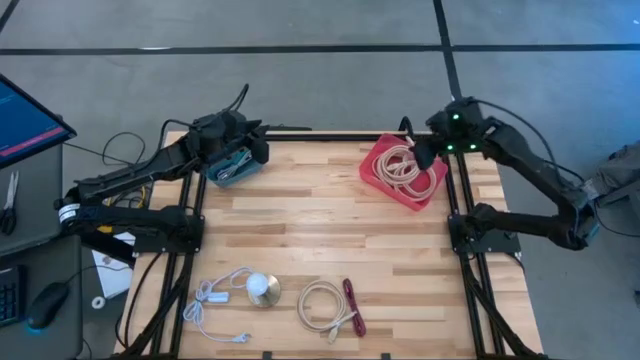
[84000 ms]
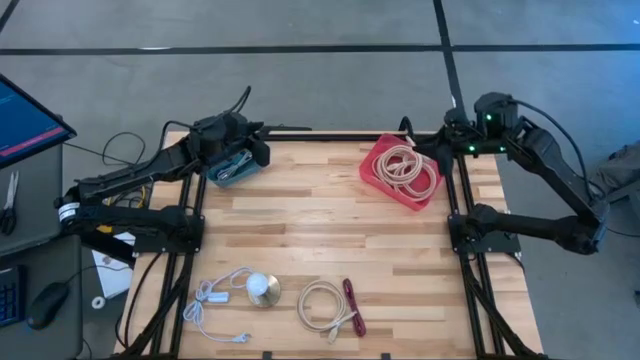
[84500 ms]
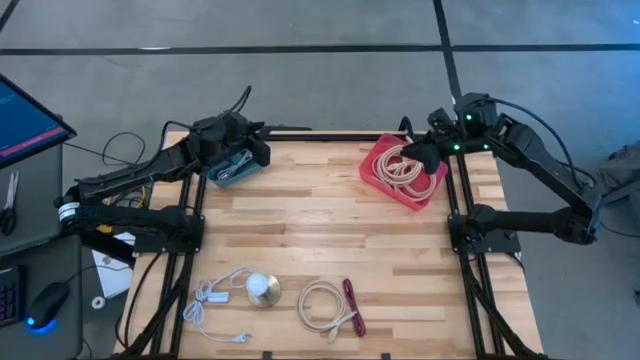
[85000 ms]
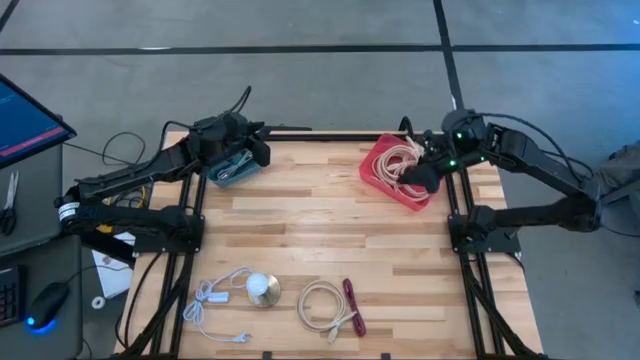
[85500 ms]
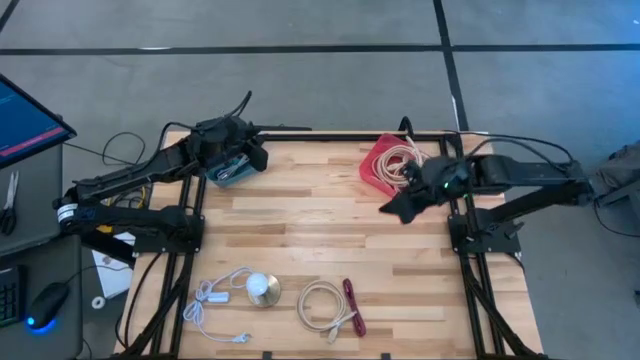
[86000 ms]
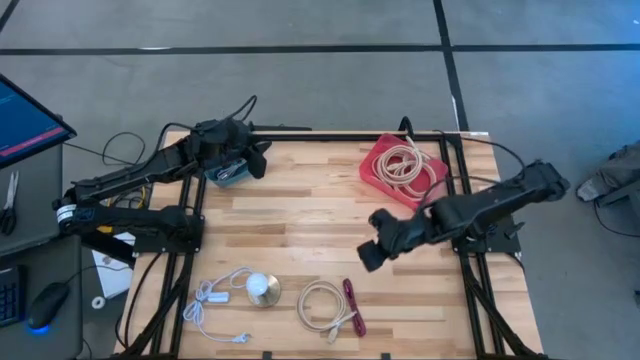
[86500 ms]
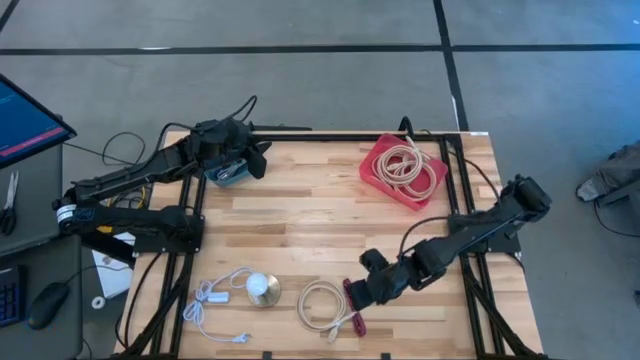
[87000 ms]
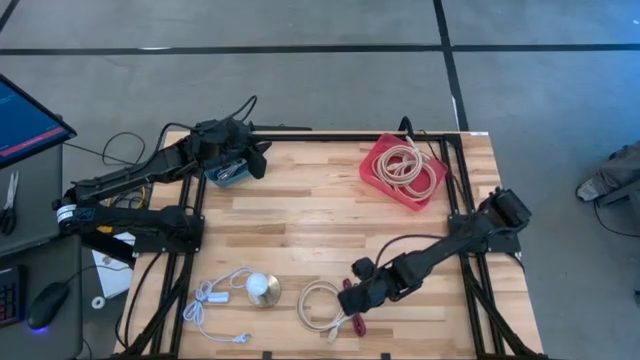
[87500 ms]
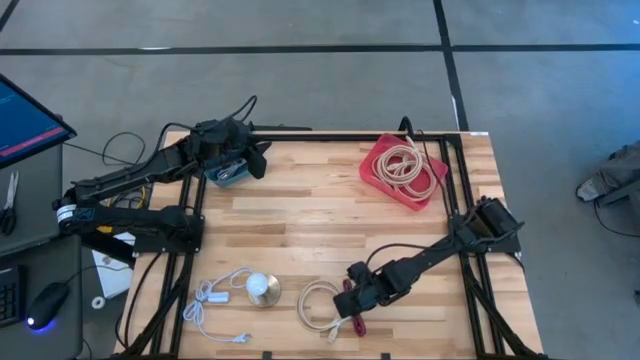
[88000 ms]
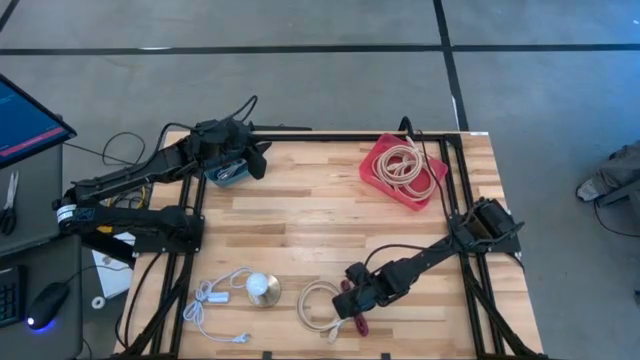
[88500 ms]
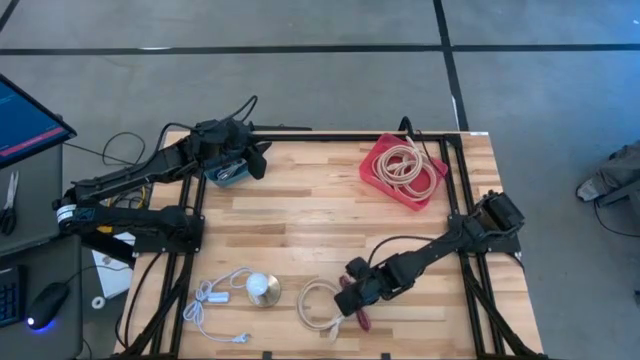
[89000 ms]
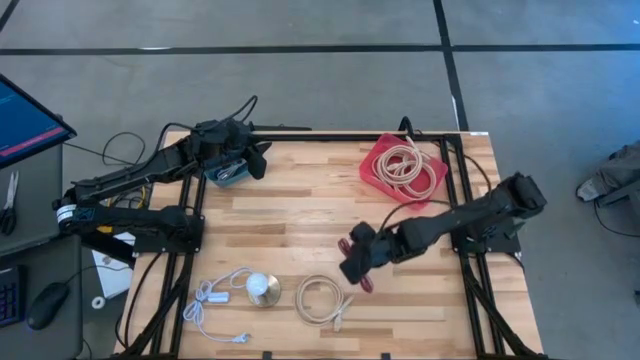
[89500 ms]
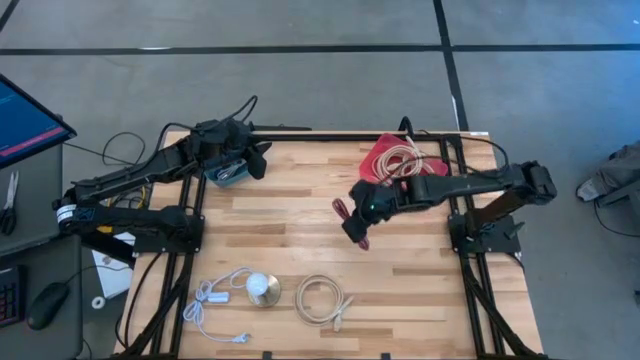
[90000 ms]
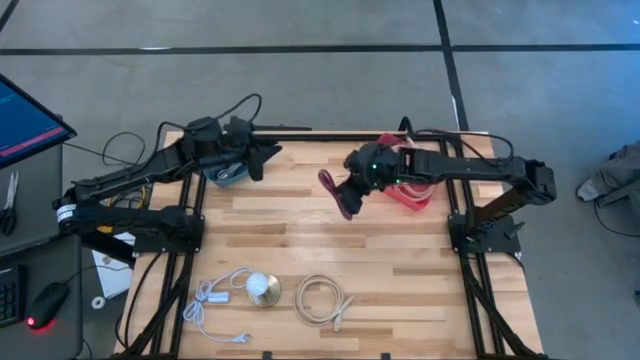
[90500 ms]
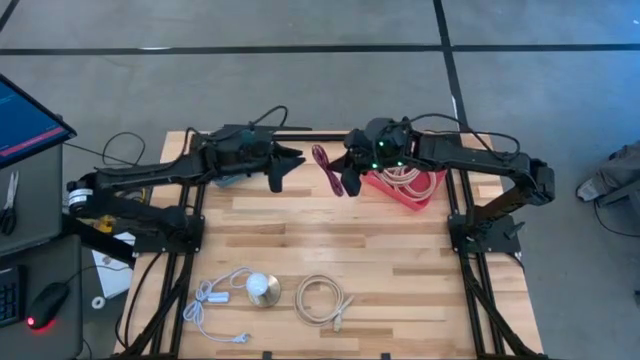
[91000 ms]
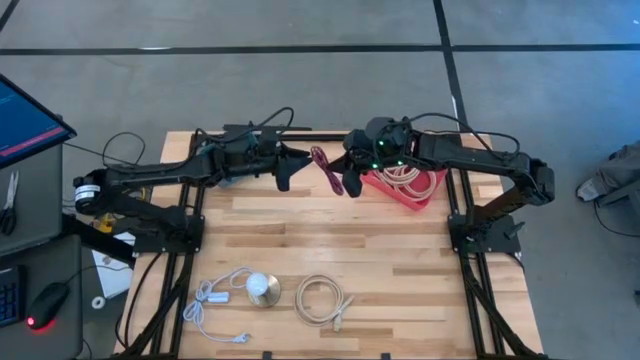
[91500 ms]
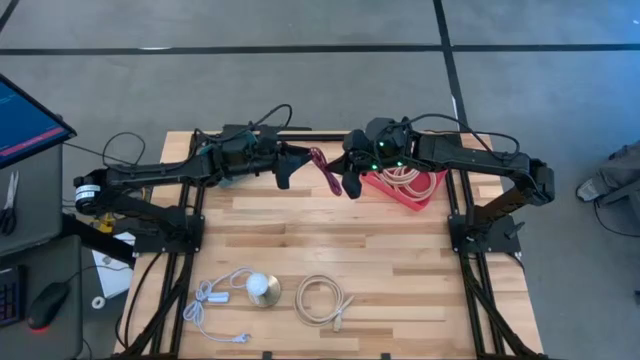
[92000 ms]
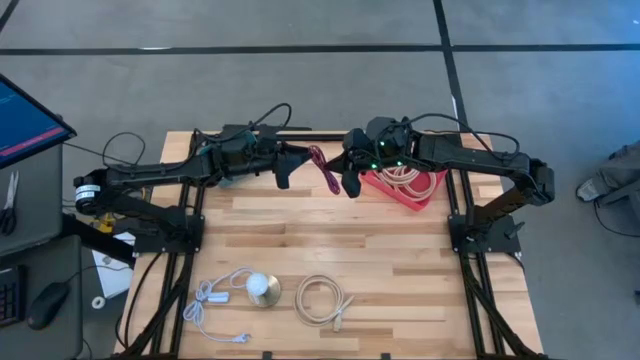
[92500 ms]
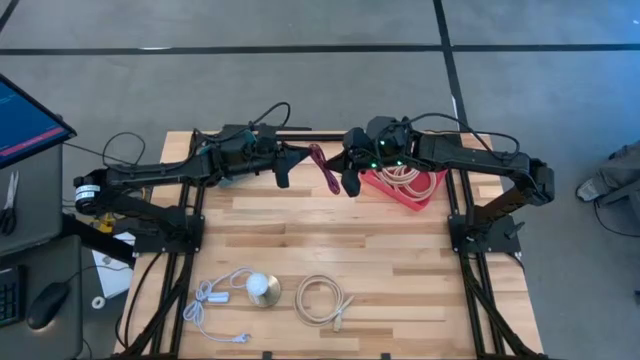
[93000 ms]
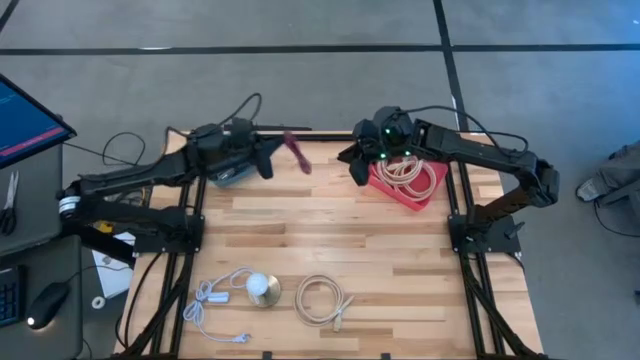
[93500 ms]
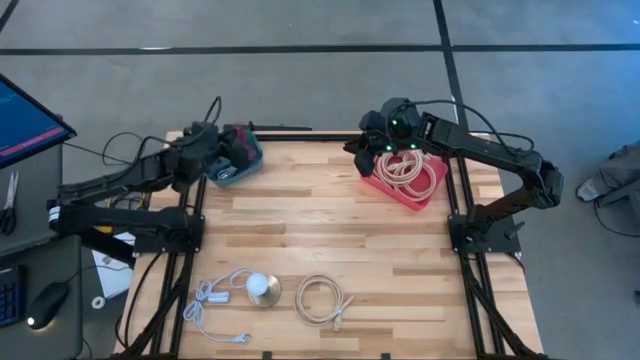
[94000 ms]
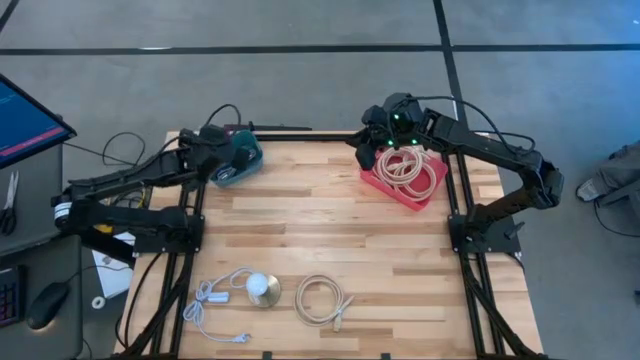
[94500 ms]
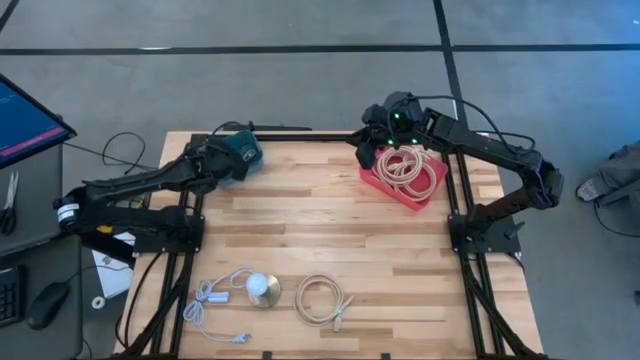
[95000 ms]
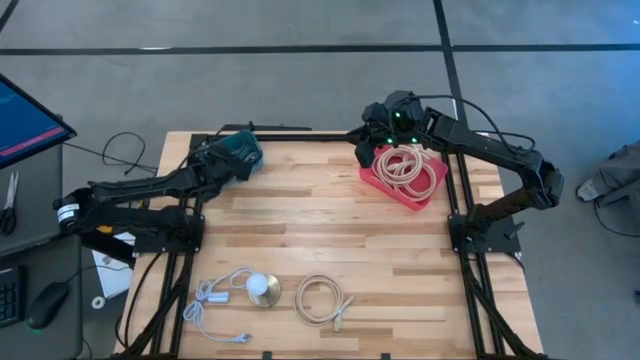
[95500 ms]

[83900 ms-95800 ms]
Task: Pick & Place USB Port
Put the pink black charger cable into blue bin

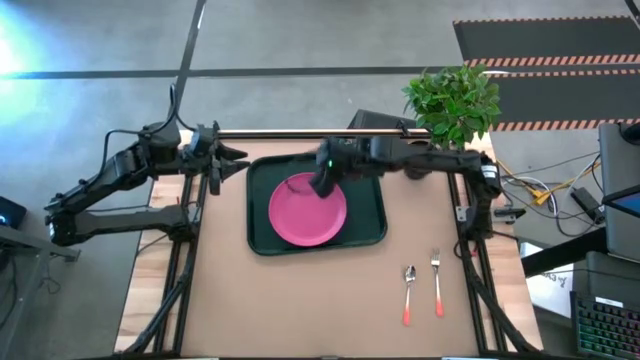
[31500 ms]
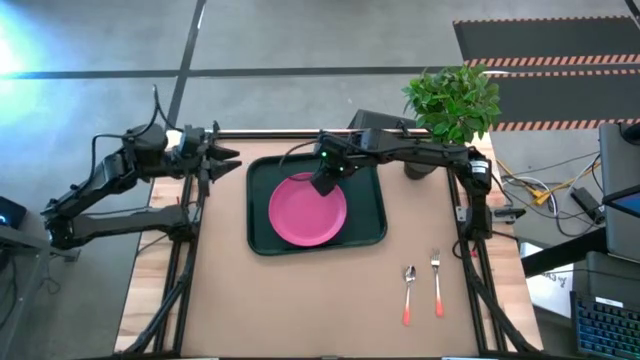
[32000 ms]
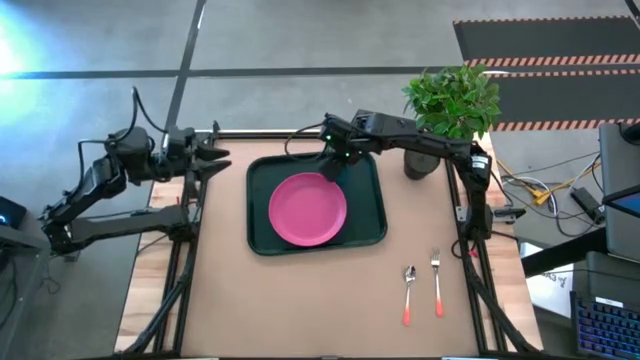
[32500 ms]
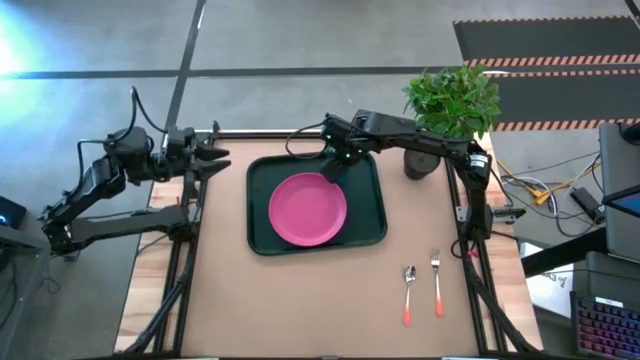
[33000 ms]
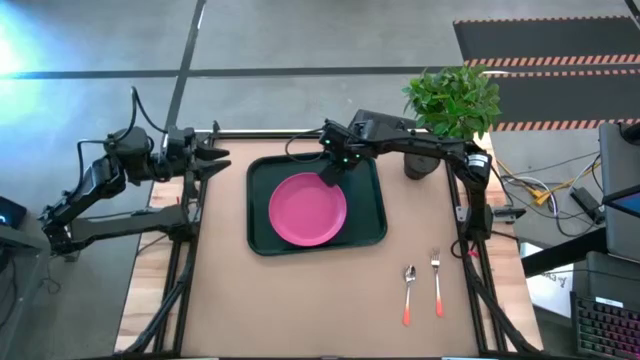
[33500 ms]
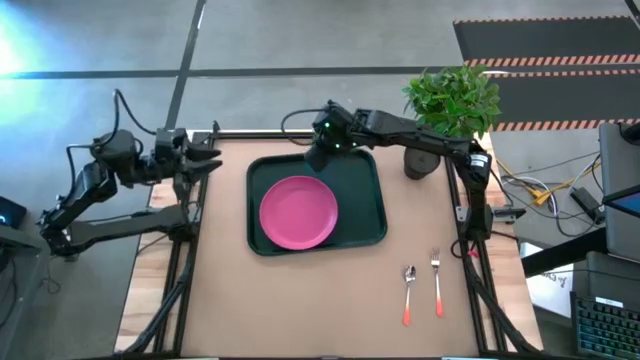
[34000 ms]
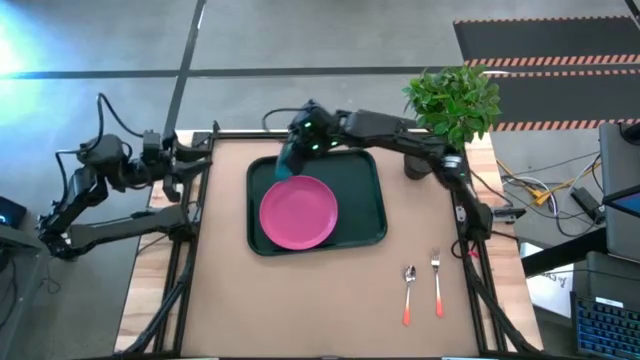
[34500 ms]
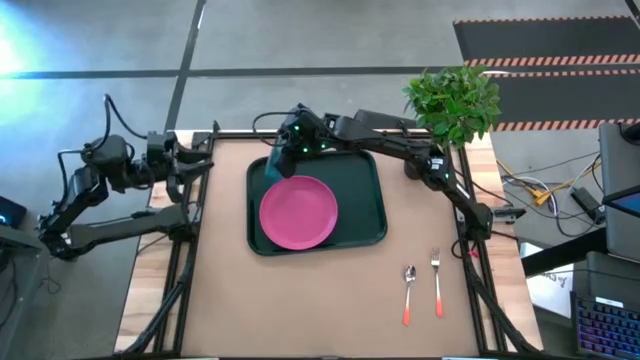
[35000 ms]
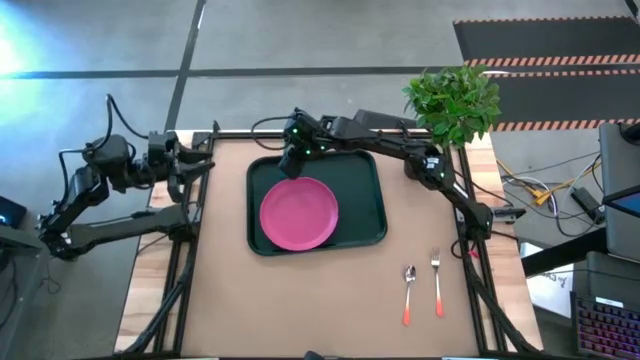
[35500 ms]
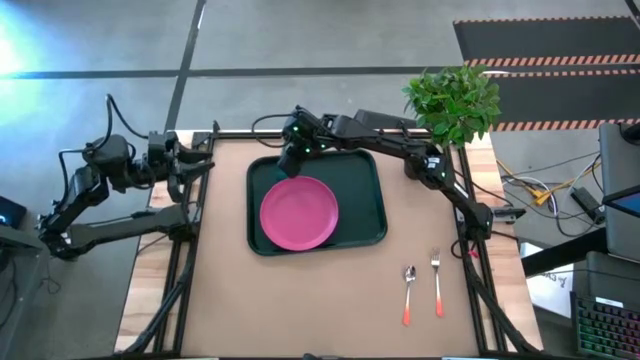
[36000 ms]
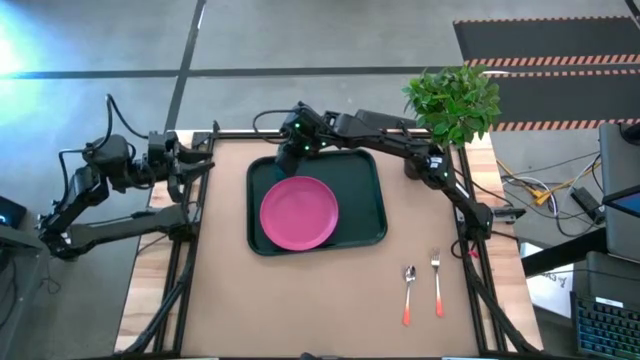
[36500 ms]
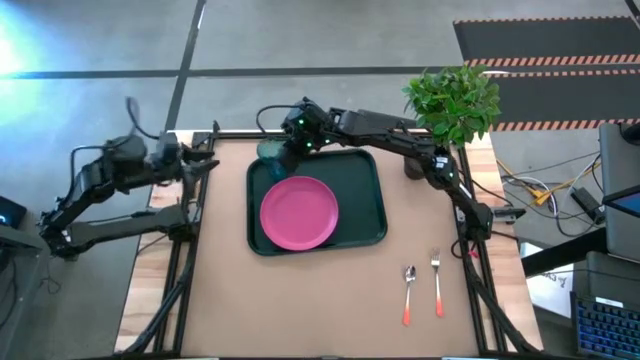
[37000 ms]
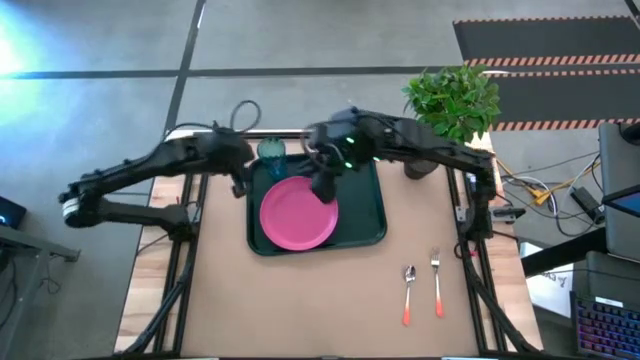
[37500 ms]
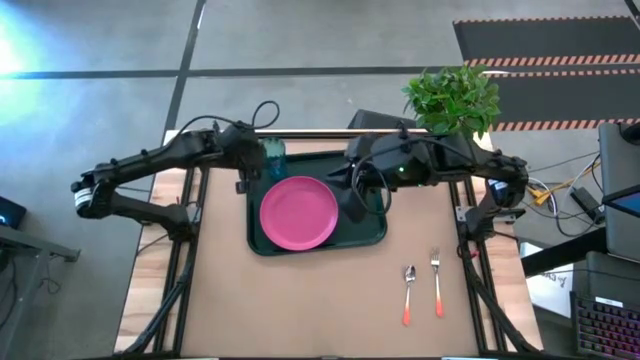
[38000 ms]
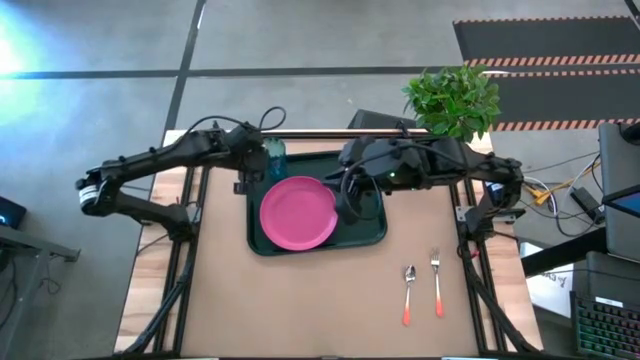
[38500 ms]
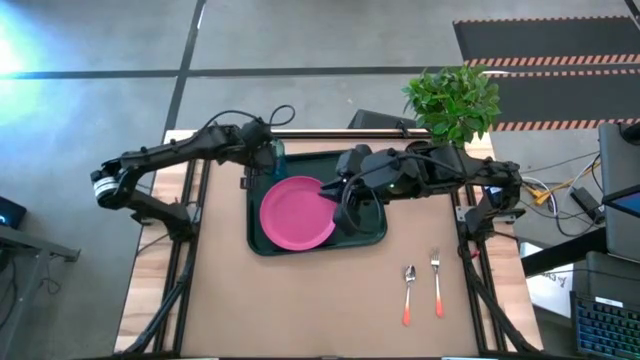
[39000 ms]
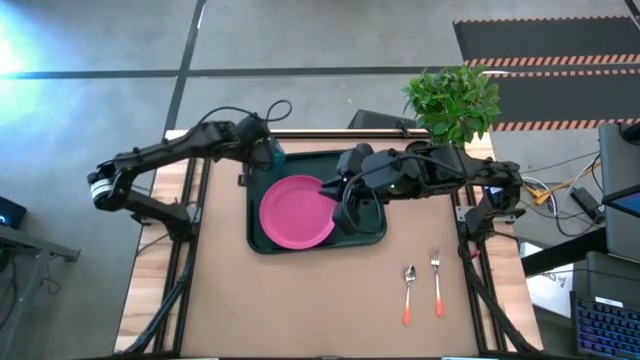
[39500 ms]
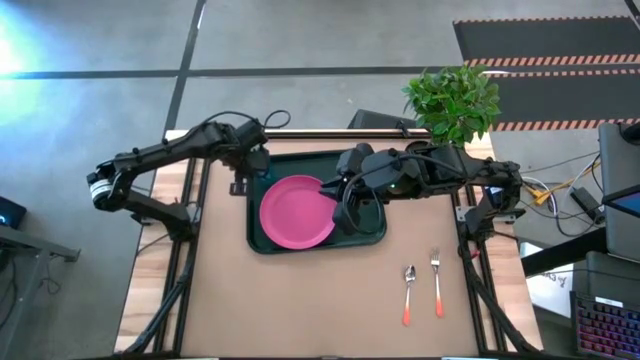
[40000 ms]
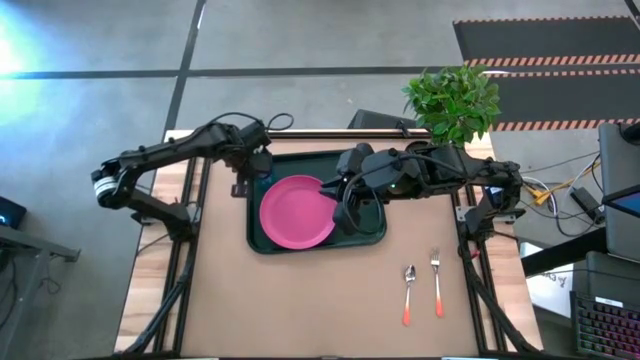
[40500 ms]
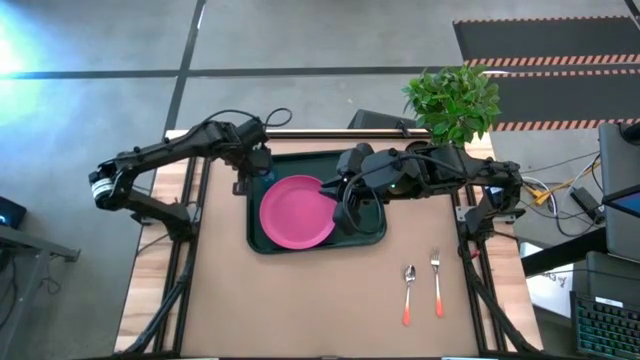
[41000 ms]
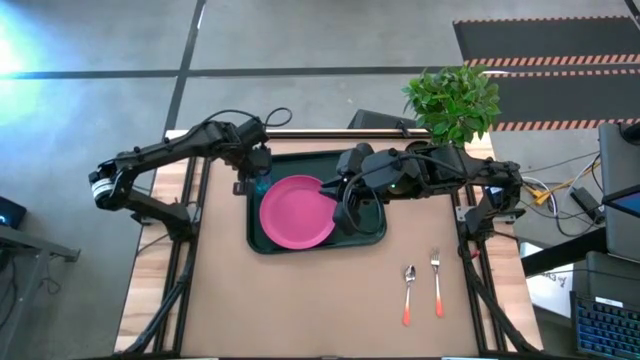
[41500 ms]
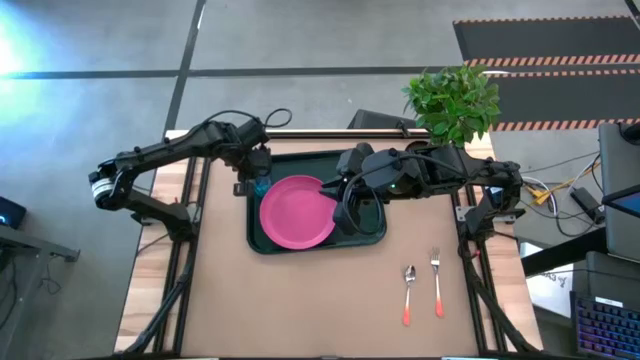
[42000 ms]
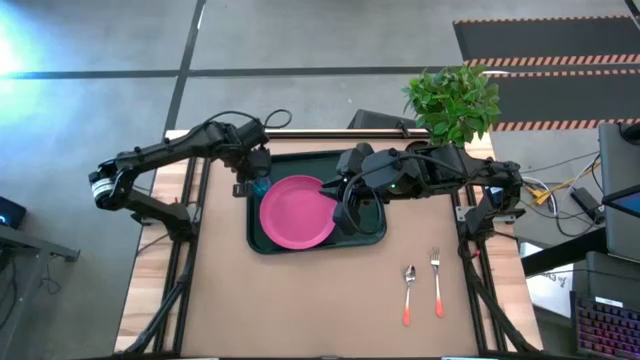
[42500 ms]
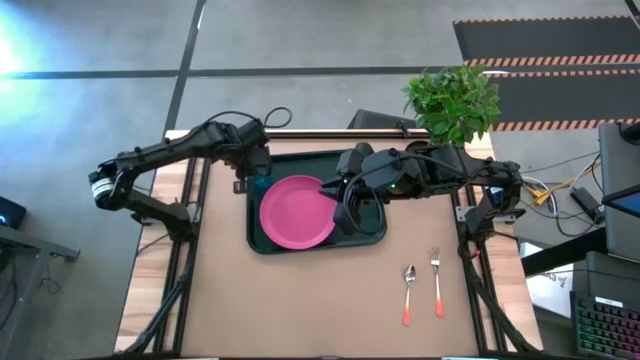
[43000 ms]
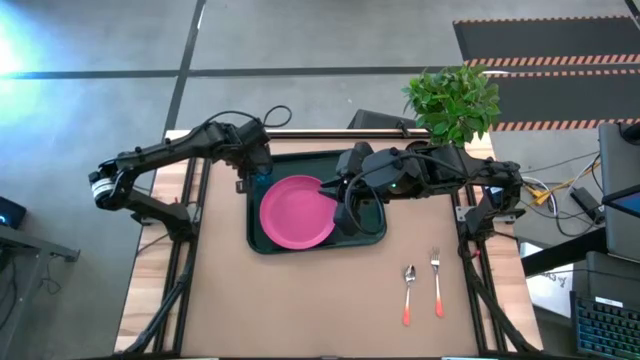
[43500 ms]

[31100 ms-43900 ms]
Task: Pick and place plate/cup/fork/spoon on tray
Adjust the blue glass on the top left of the black serving tray
